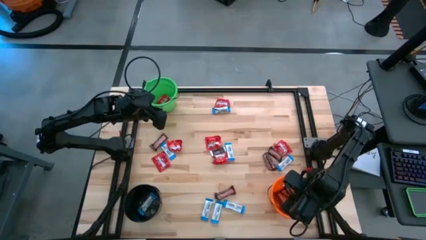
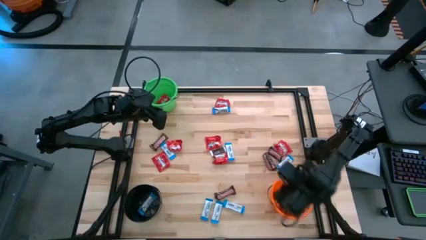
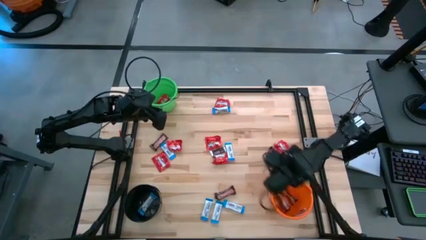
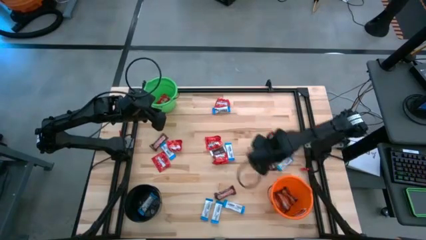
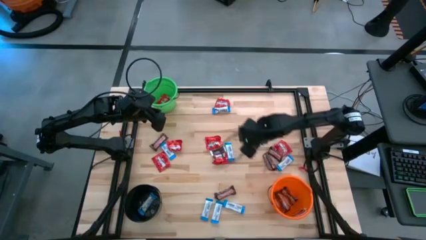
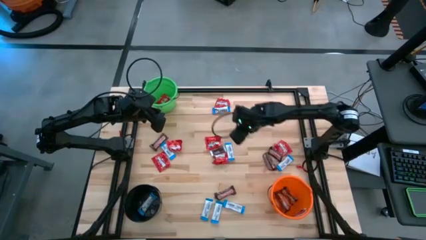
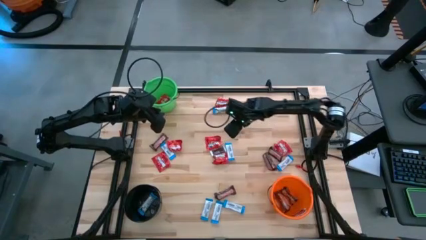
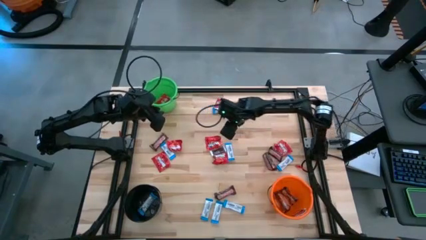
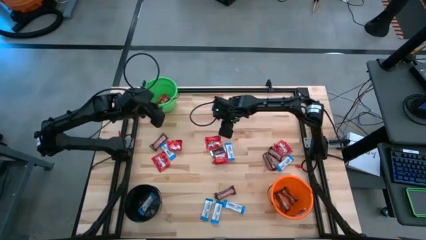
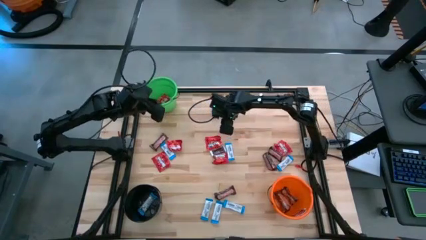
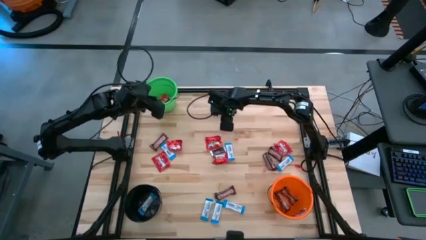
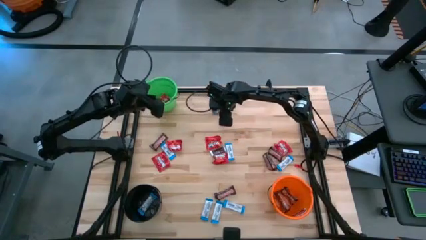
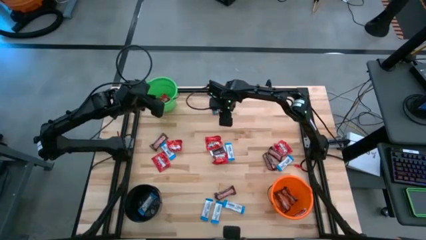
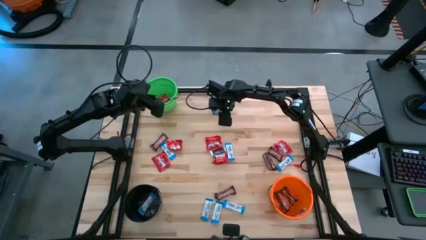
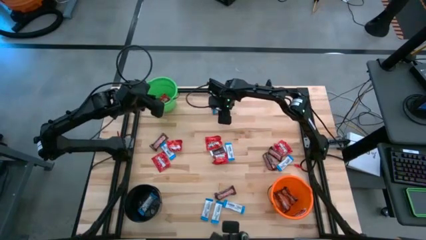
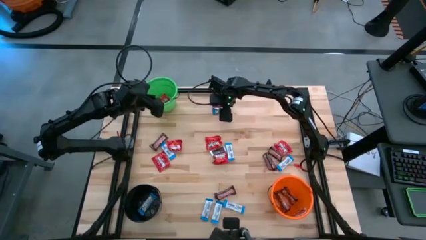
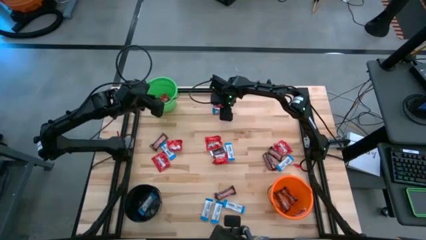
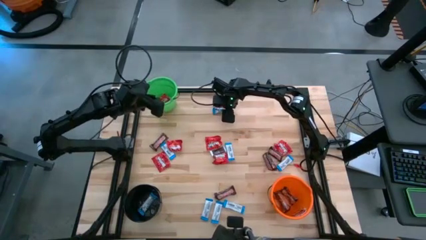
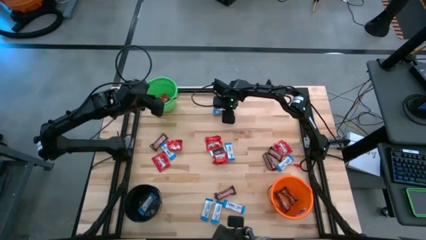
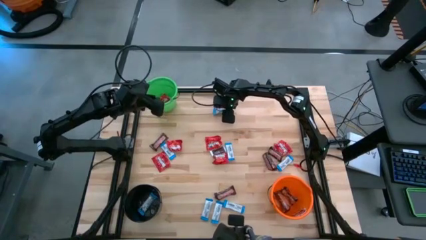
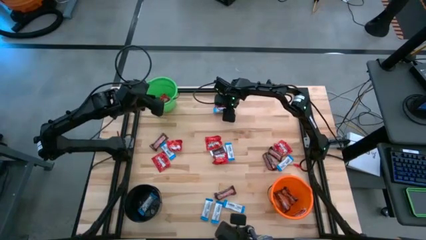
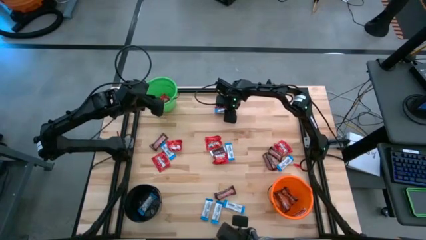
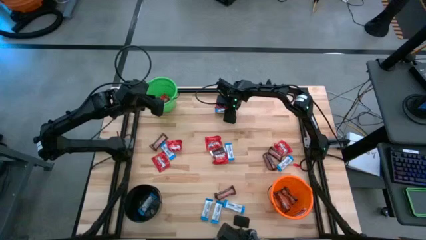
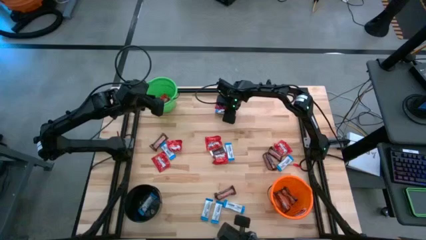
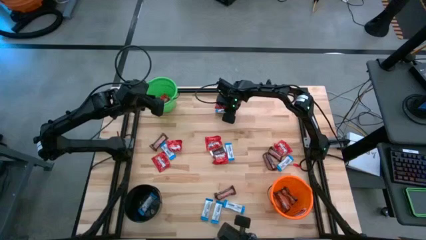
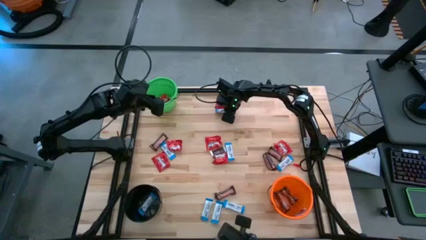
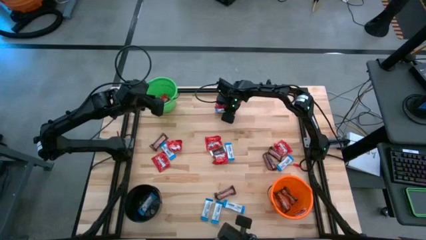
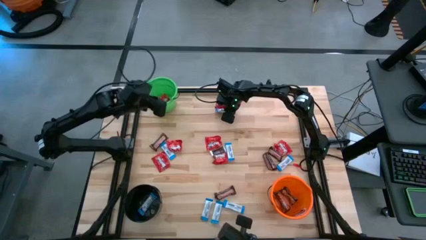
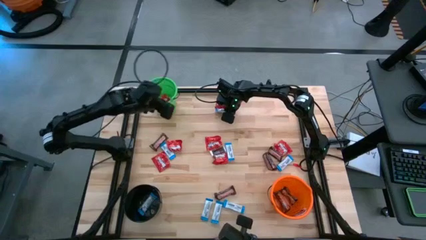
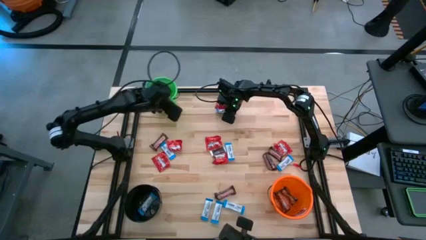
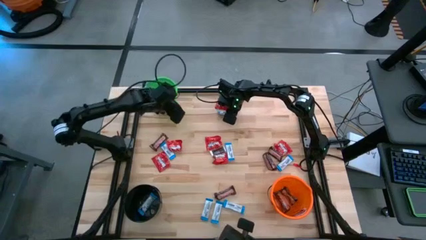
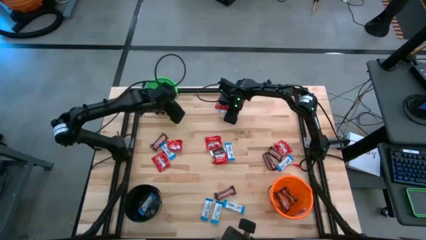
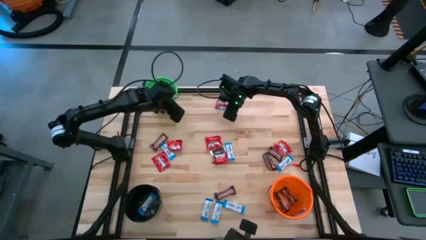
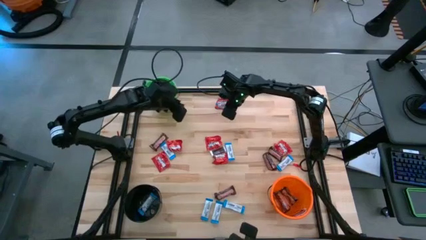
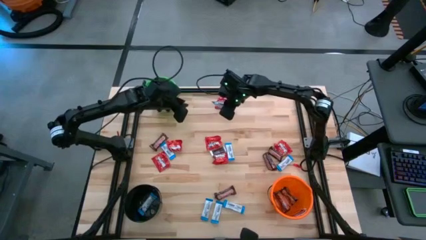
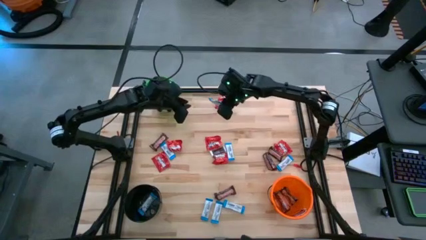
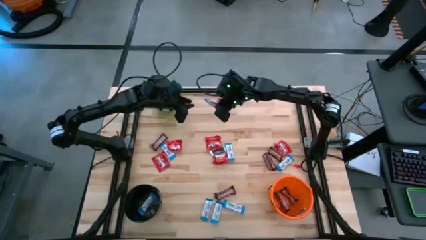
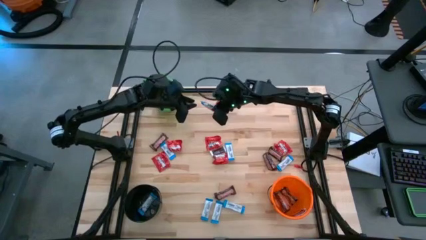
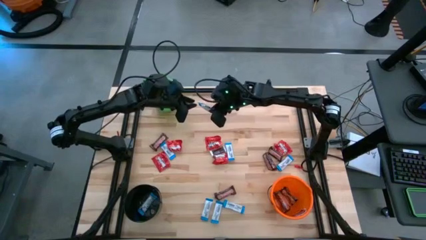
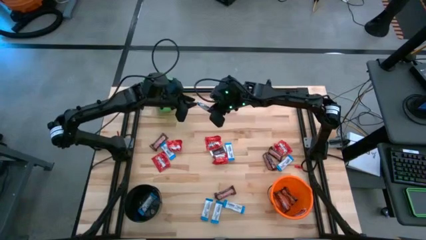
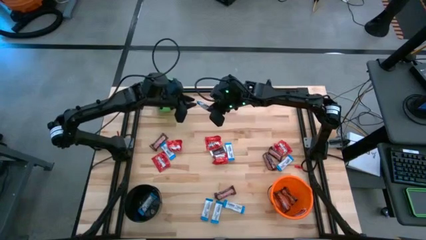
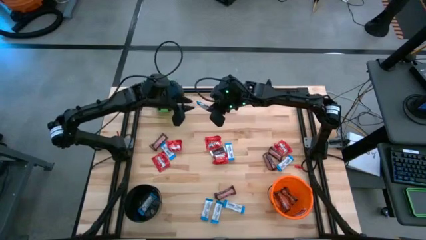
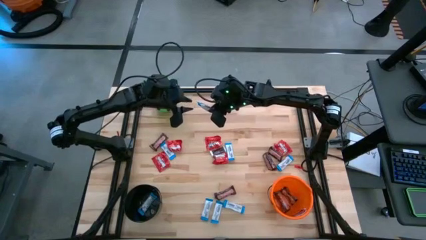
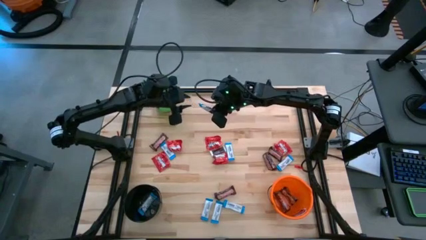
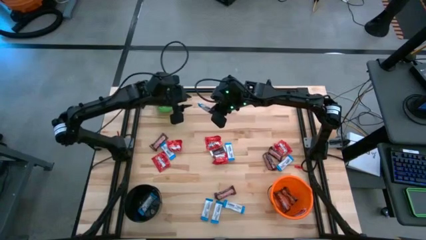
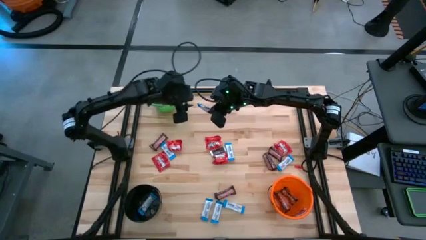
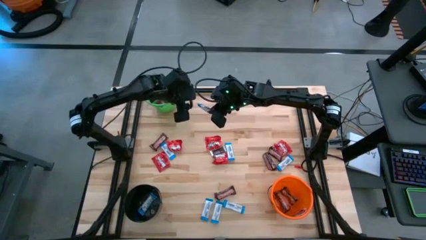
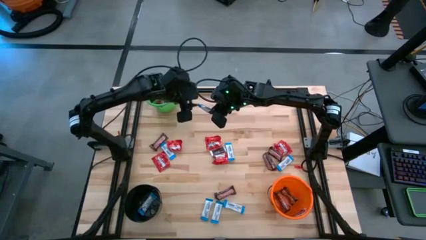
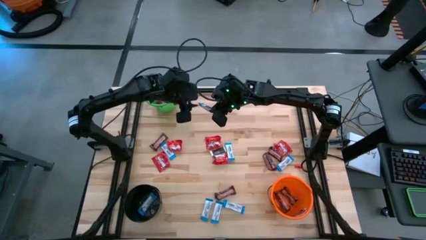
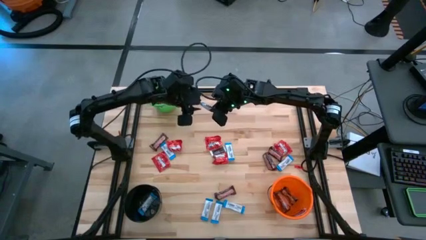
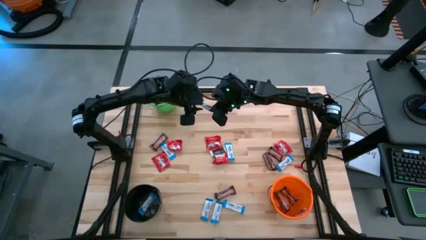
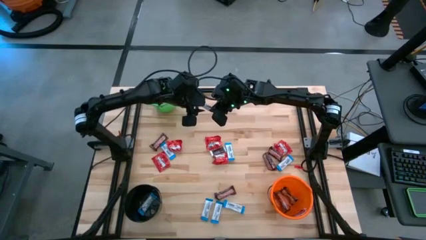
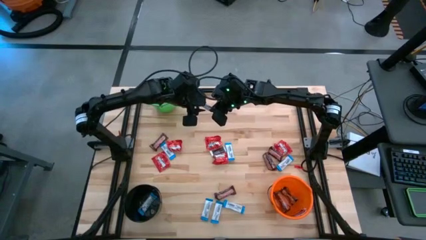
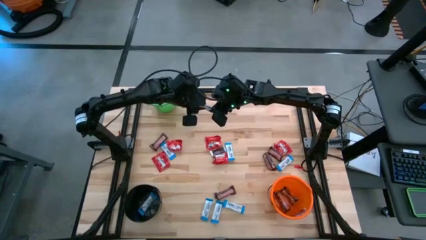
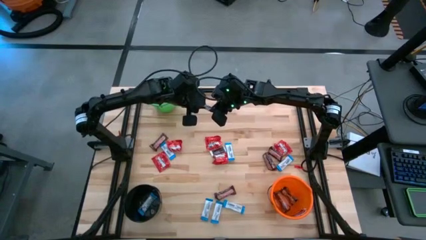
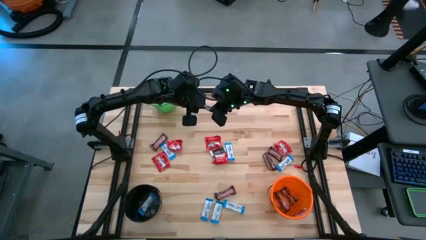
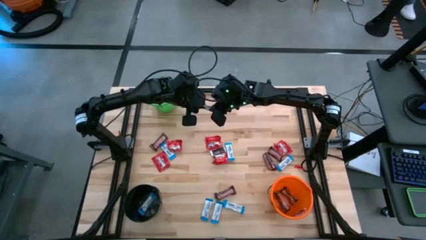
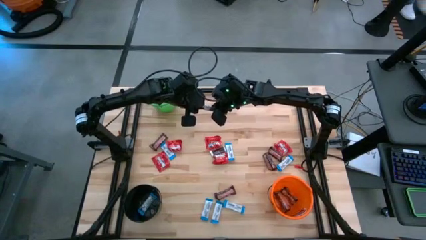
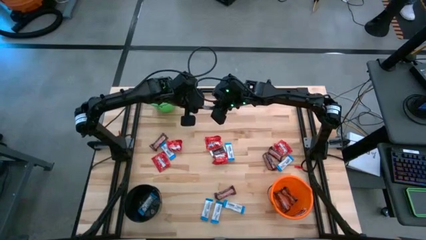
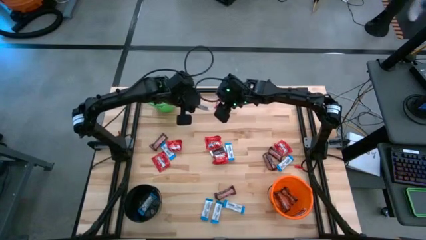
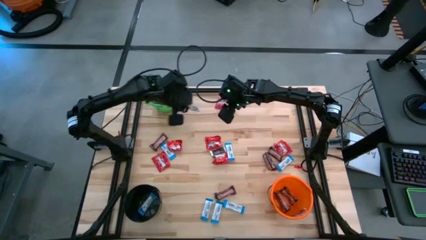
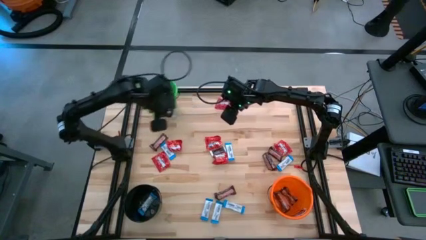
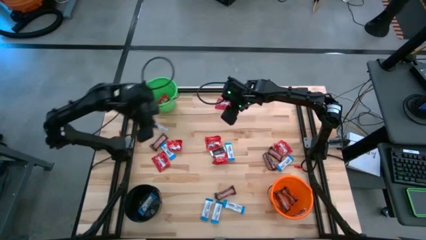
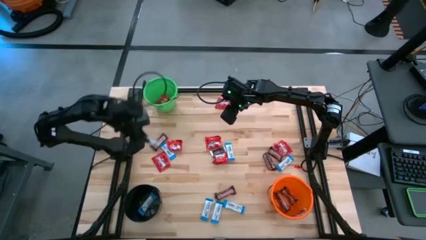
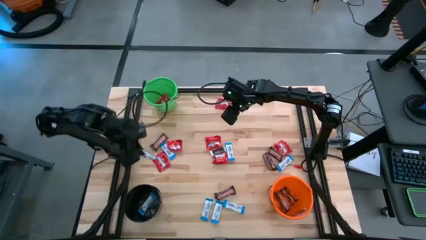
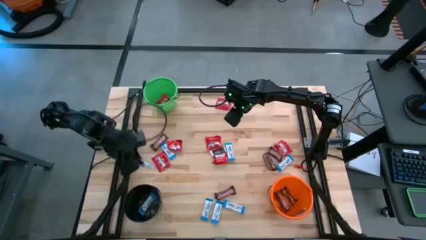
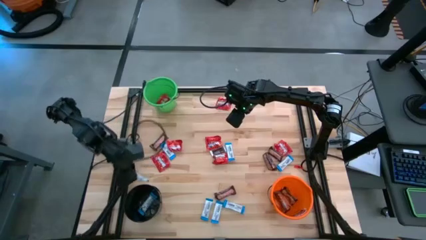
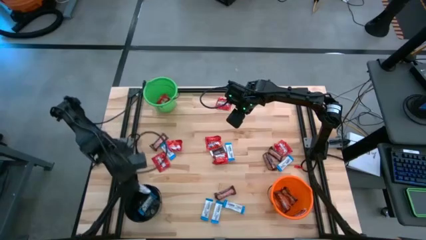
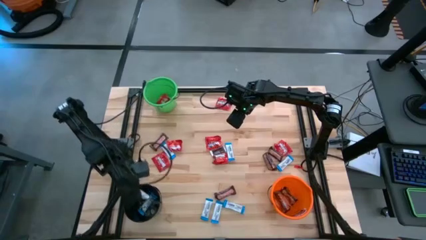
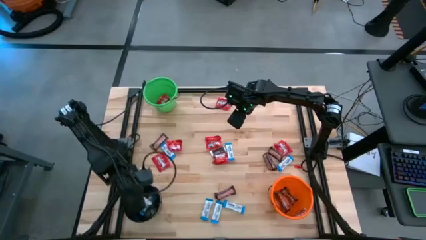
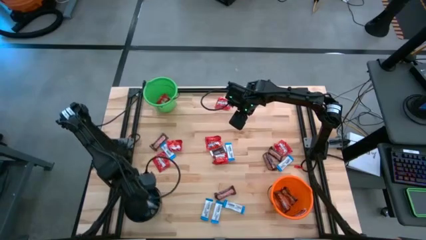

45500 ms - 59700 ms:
Task: Sort candy
Put the white chocolate into the black bucket

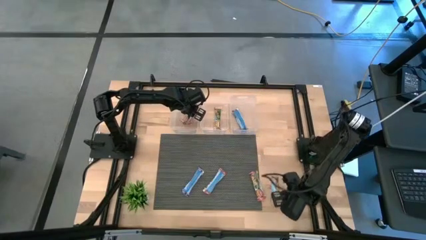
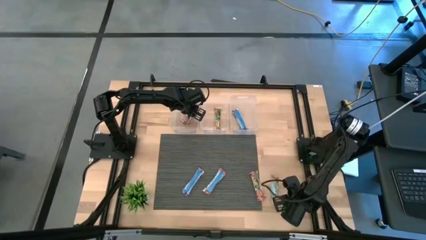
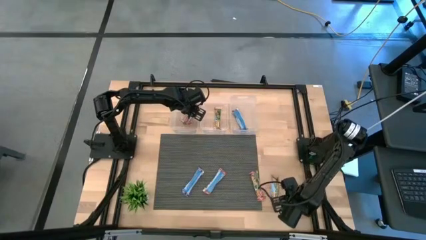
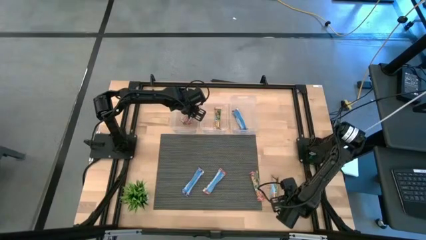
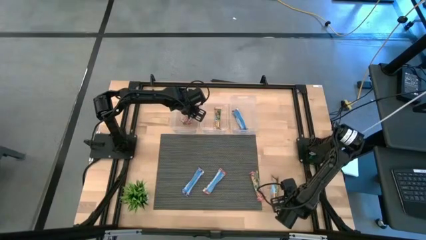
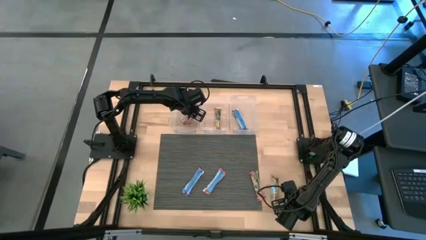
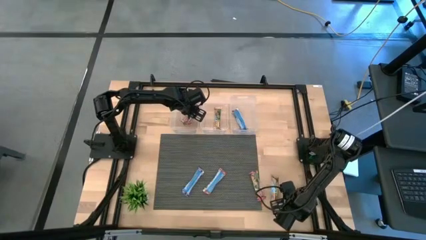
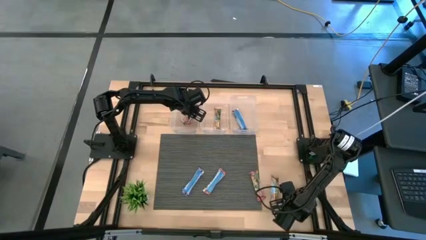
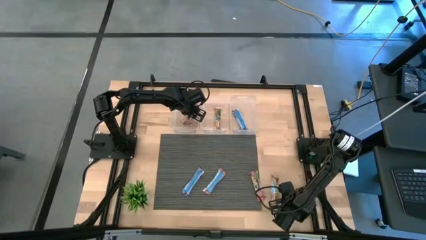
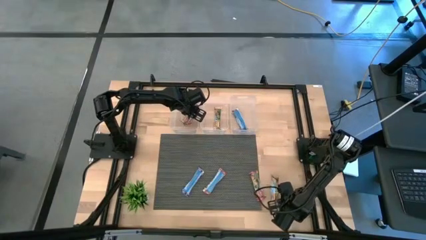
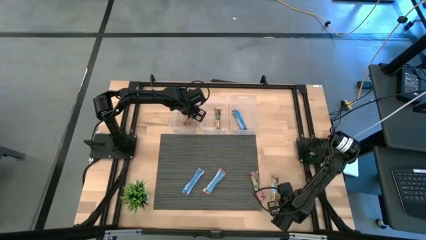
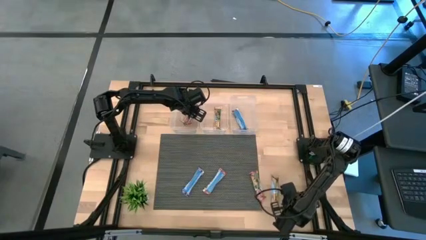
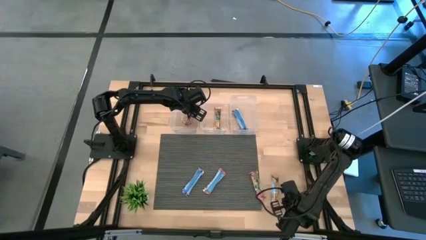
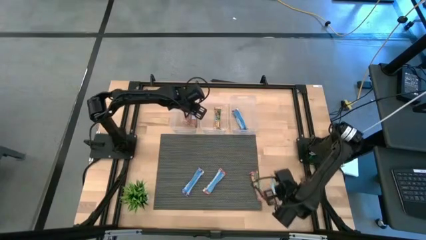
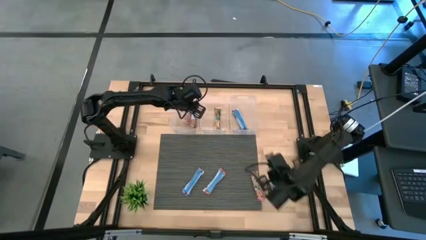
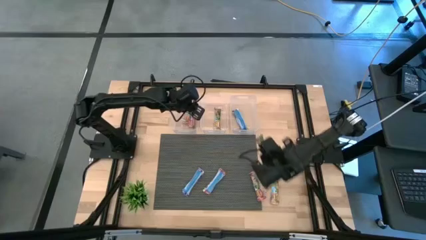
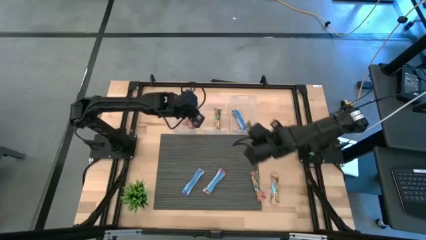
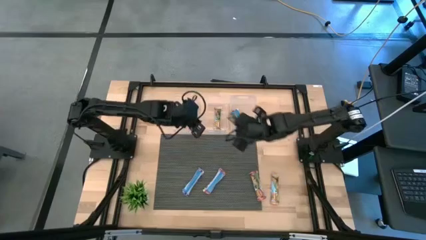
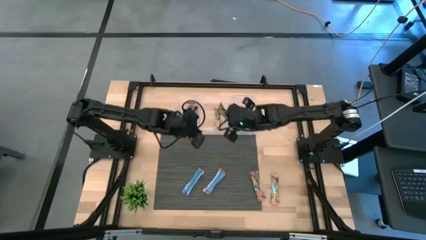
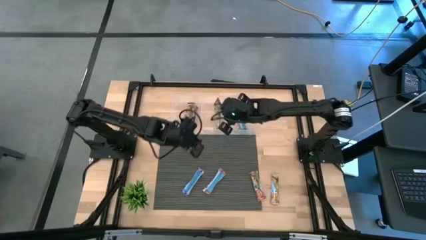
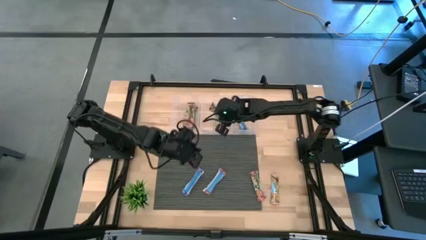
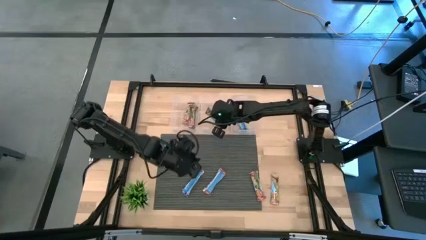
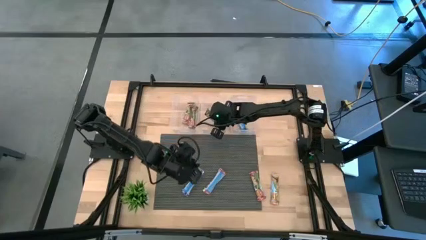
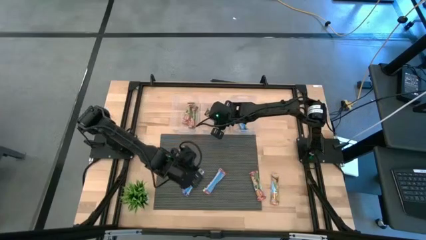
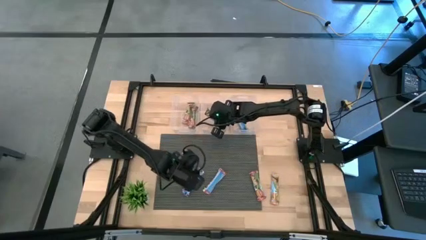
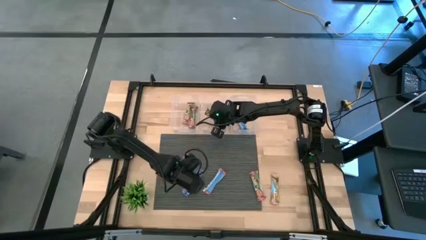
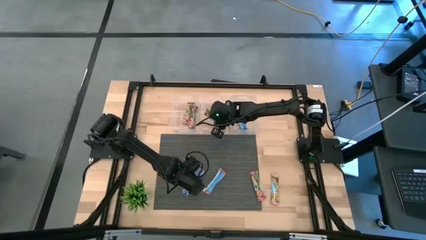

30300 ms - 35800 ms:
Task: Pick and place Granola Bars by type
Put the right orange granola bar into the middle transparent bin
